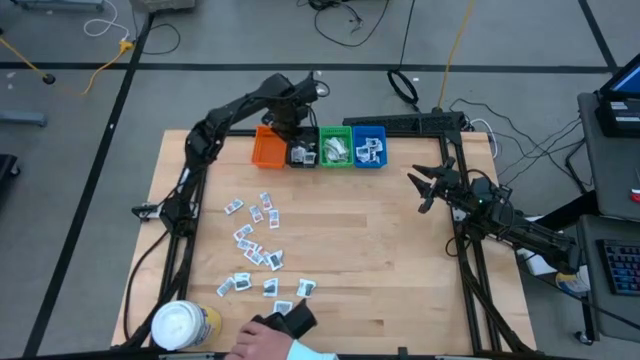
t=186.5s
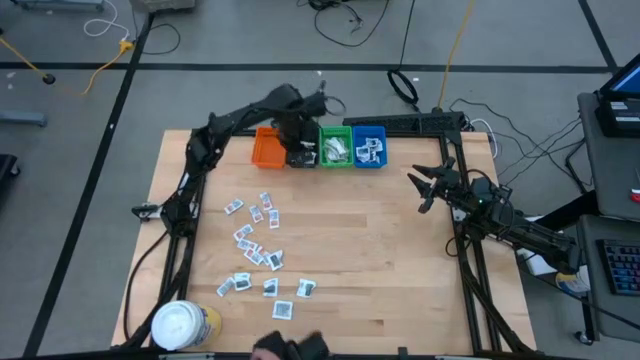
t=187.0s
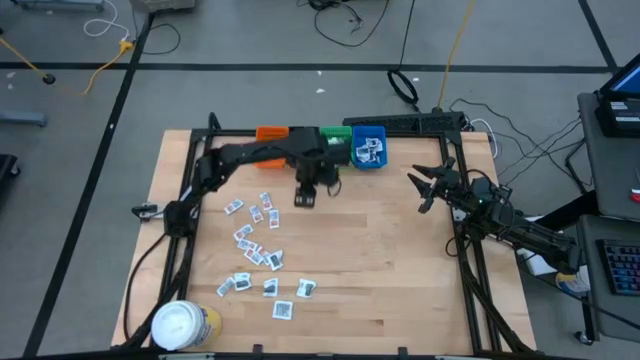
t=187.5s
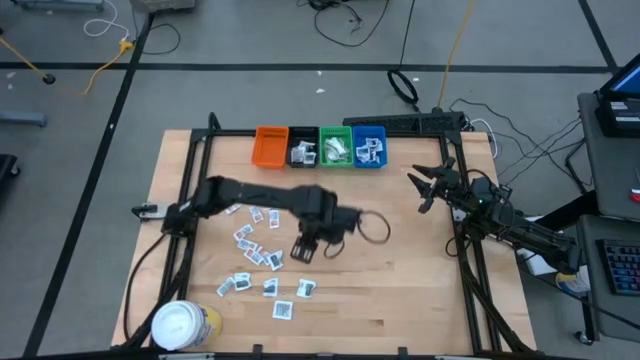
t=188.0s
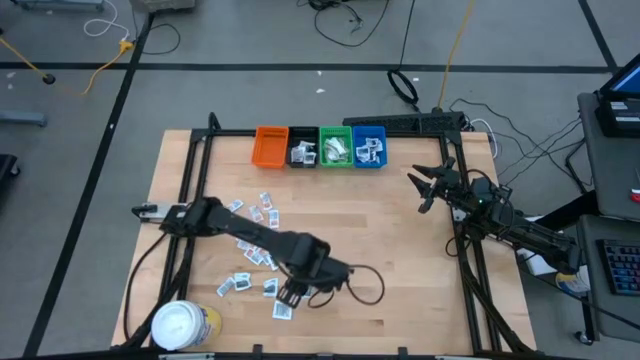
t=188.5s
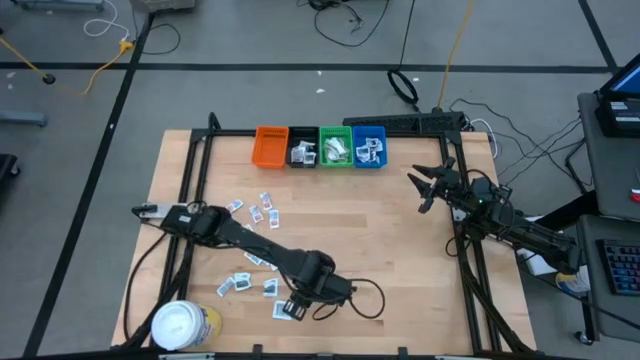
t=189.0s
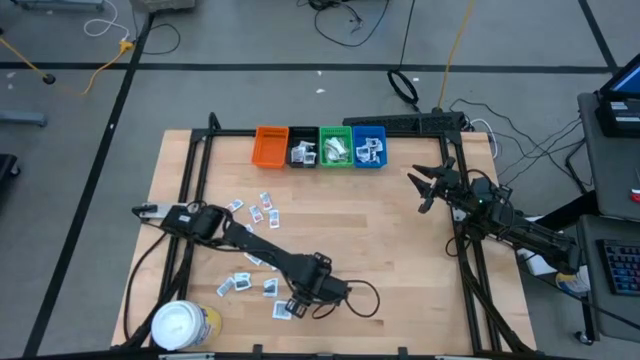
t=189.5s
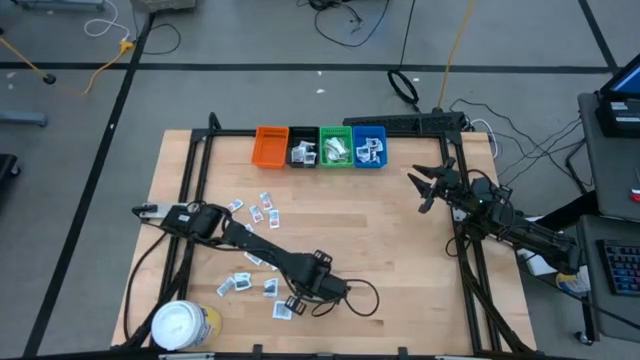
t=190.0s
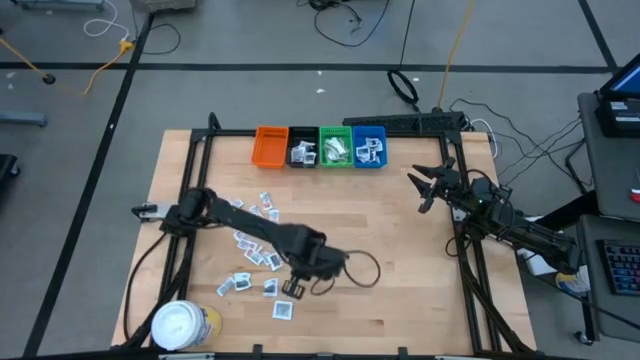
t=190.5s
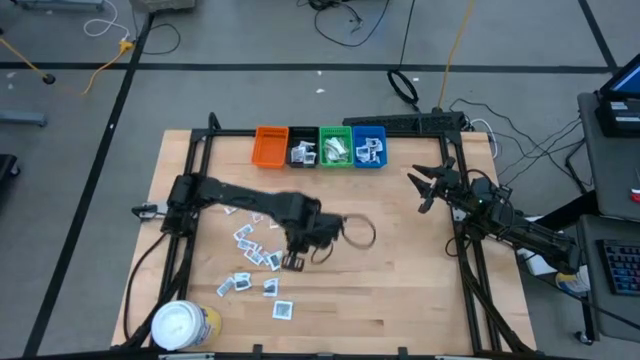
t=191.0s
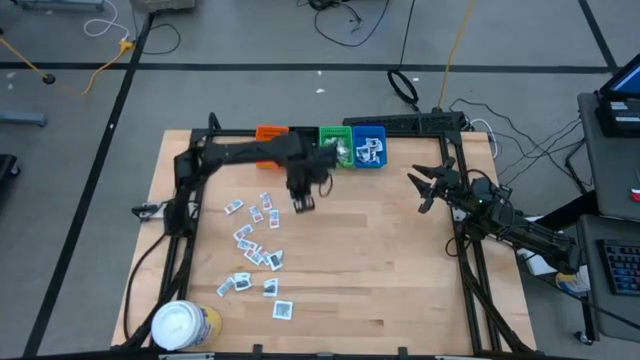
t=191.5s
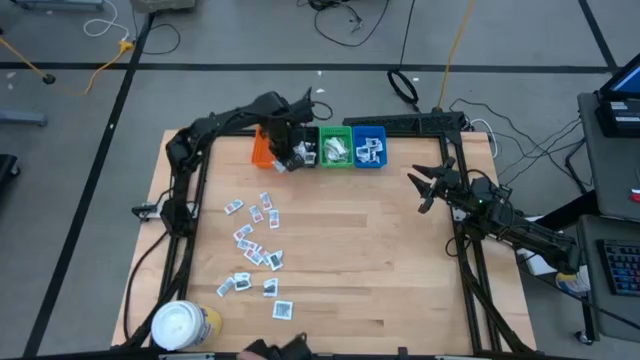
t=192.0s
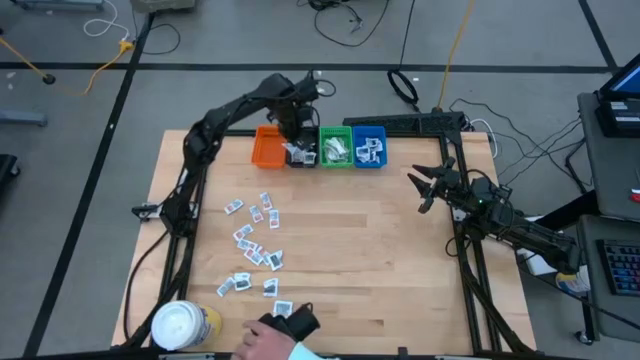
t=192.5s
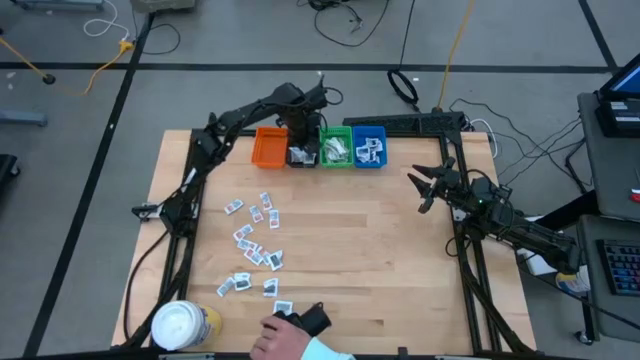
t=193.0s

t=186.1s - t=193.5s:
Task: Pick & Place First Aid Supplies
Put the blue packet into the black bin

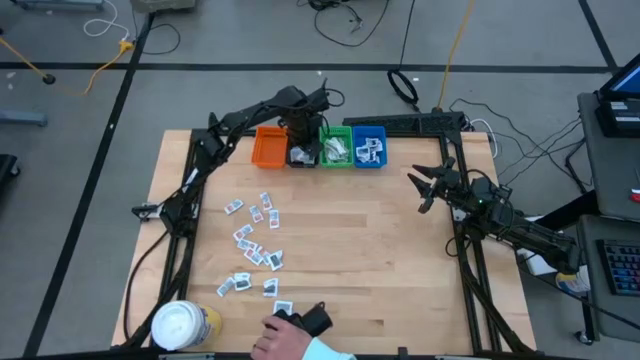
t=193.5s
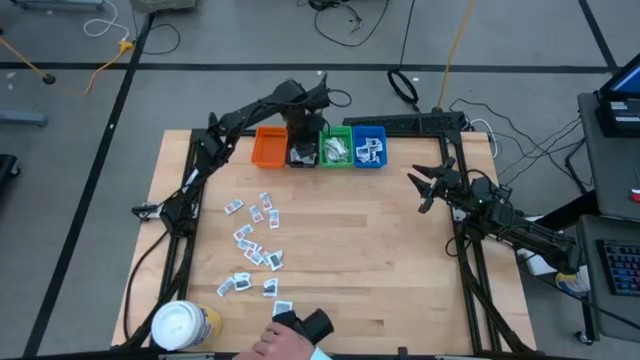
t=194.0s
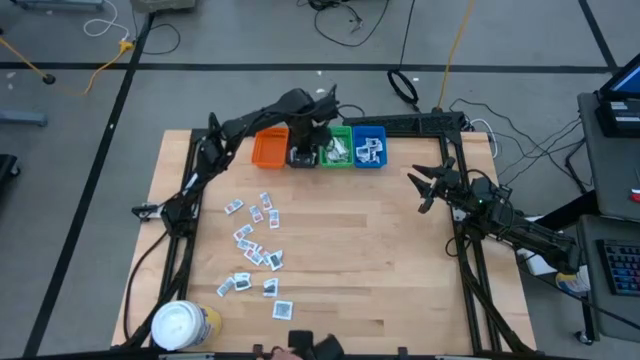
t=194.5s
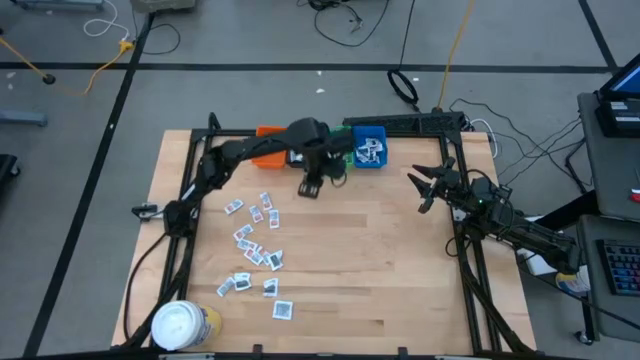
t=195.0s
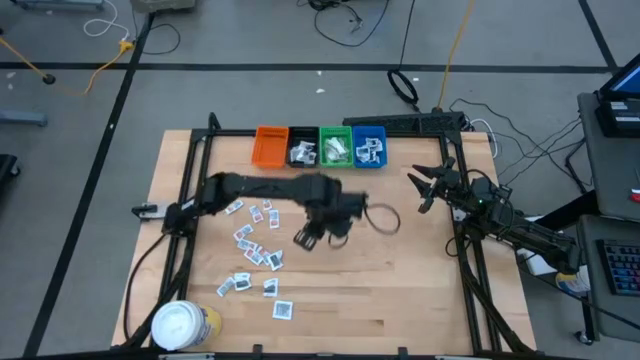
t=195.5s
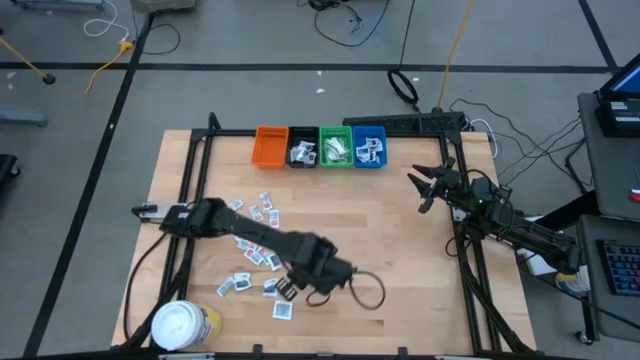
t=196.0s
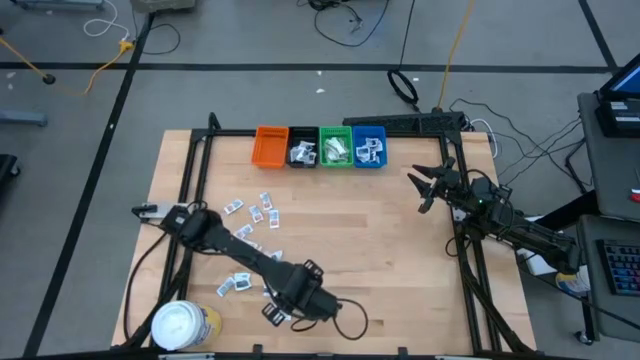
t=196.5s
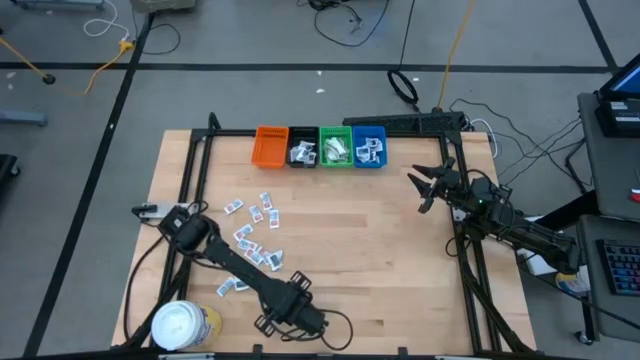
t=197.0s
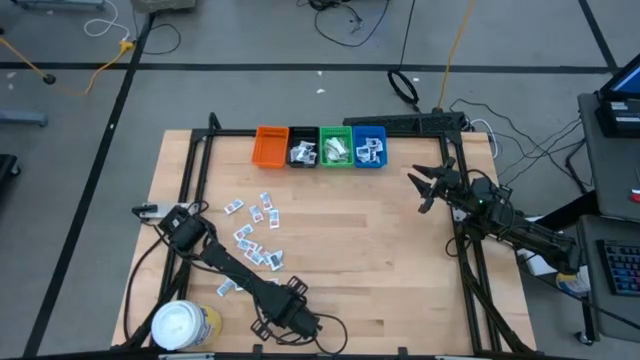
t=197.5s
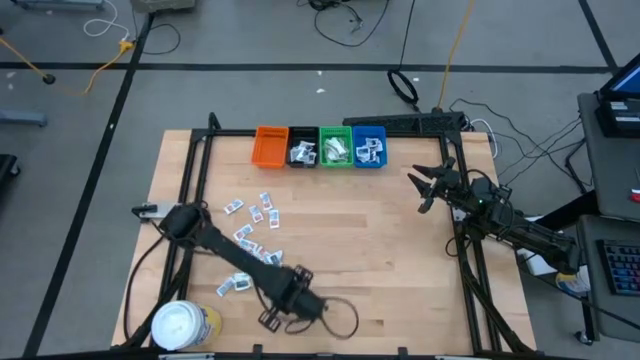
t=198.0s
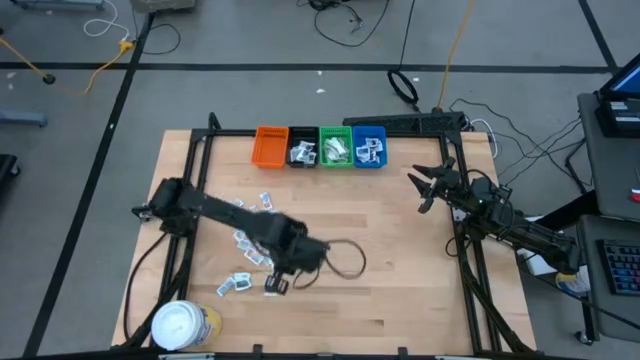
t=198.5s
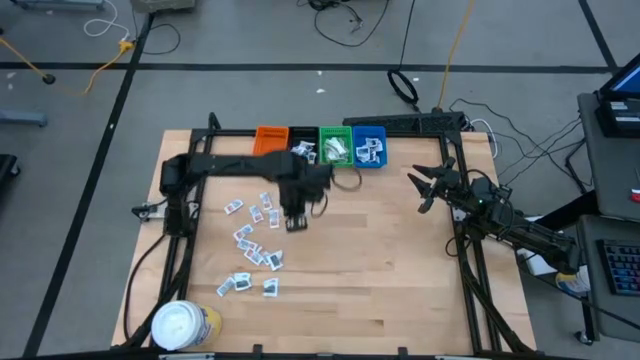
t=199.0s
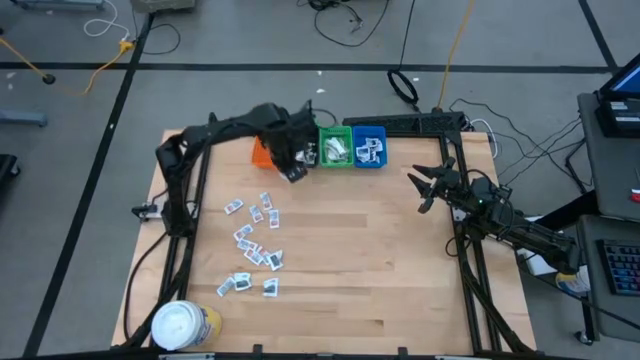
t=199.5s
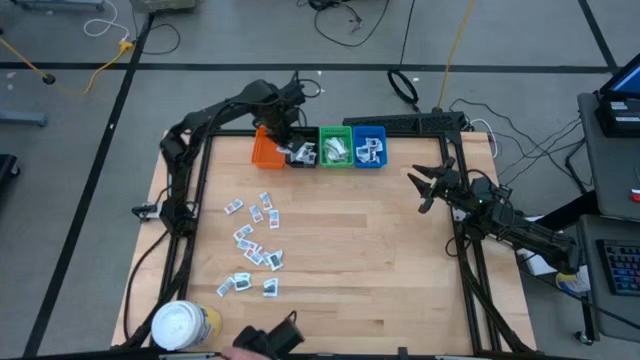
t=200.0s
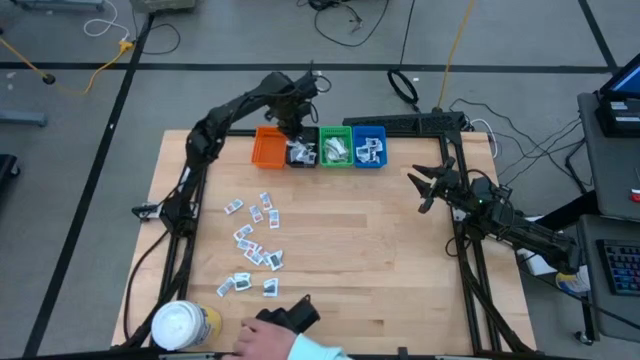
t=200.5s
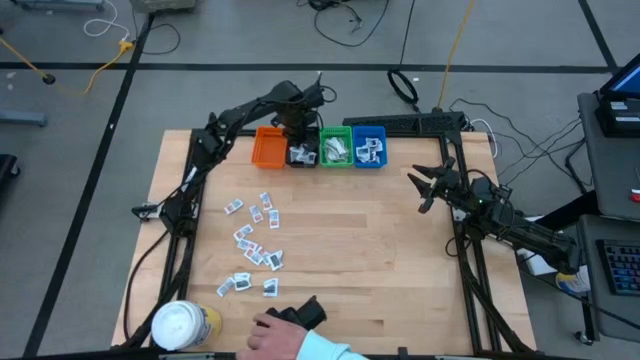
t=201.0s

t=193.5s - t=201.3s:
Put the blue packet into the black bin

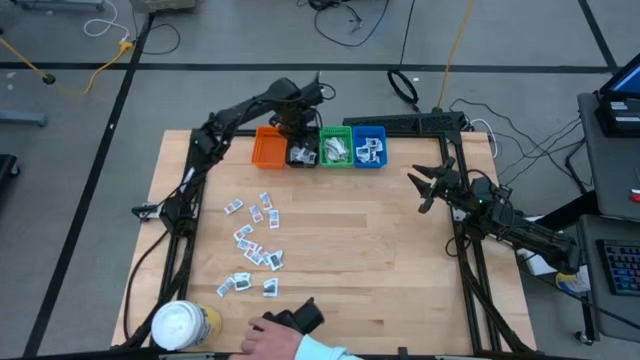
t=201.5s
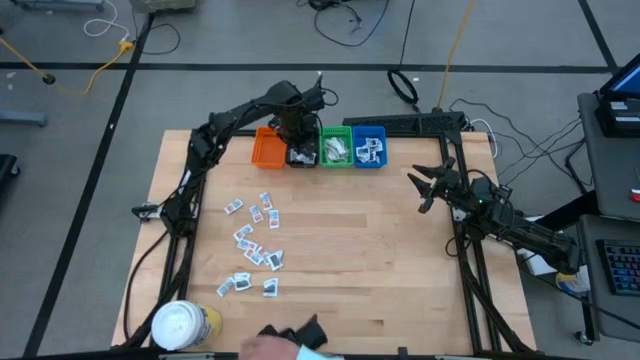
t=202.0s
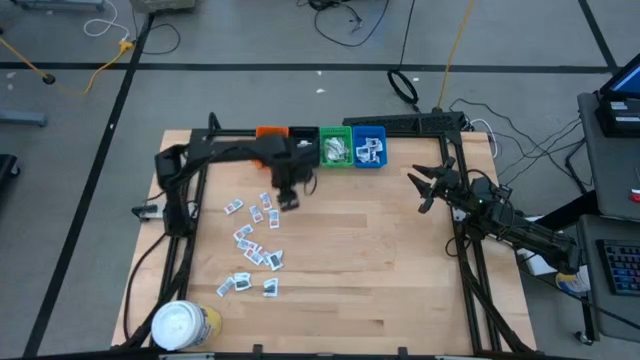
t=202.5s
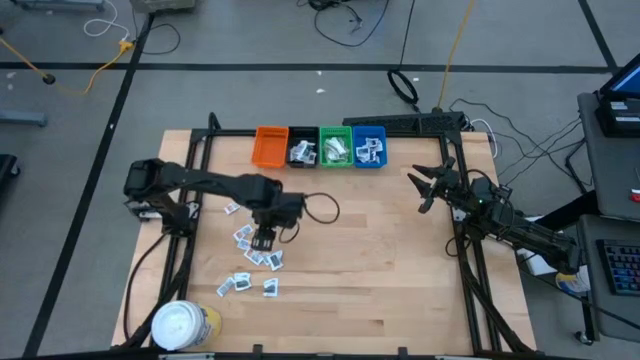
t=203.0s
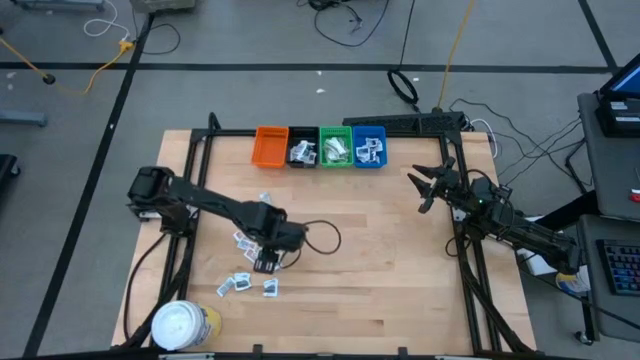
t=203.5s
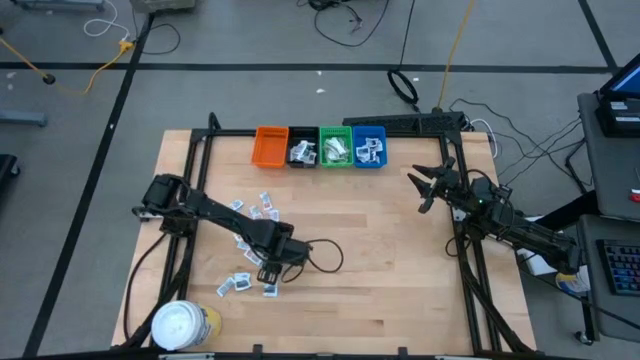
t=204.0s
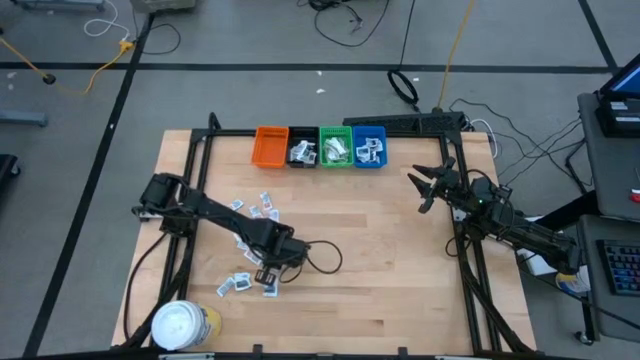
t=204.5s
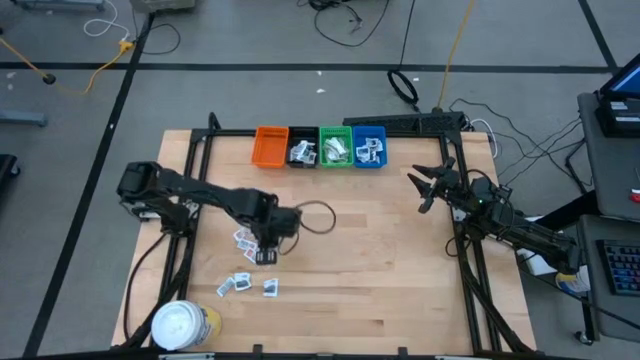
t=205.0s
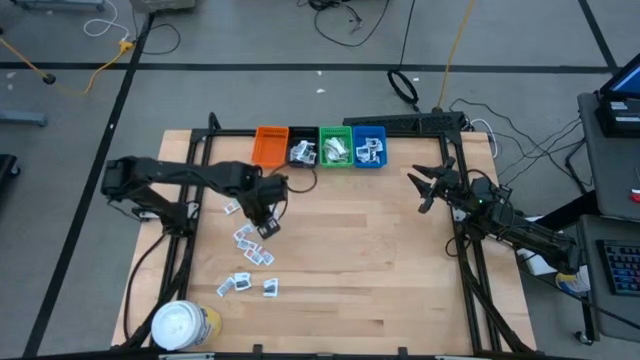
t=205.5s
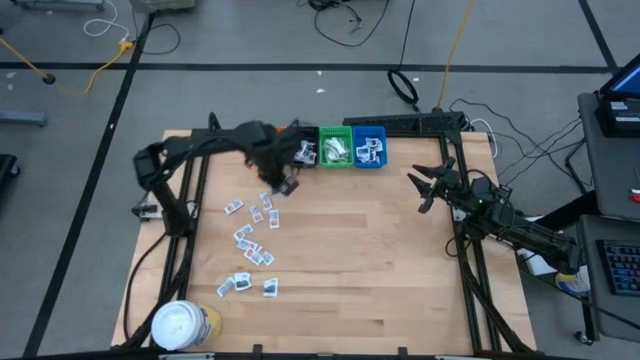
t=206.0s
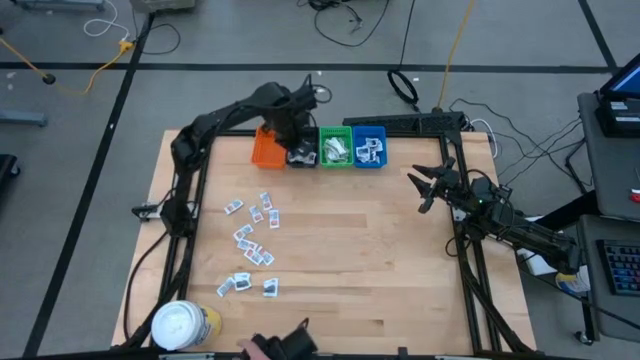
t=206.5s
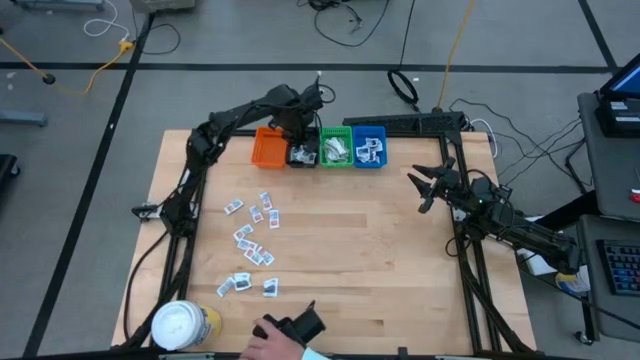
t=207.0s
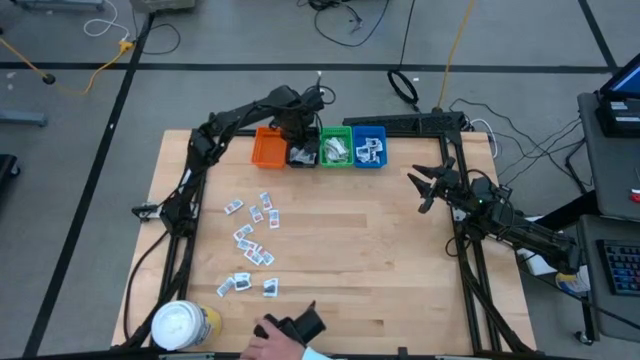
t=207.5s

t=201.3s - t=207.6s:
Put the blue packet into the black bin
